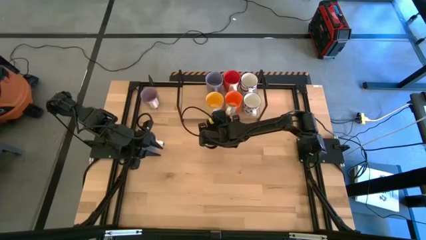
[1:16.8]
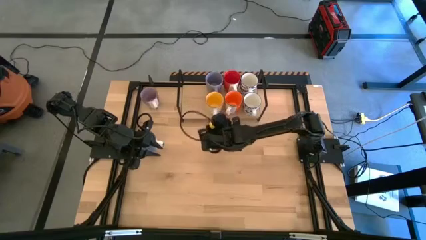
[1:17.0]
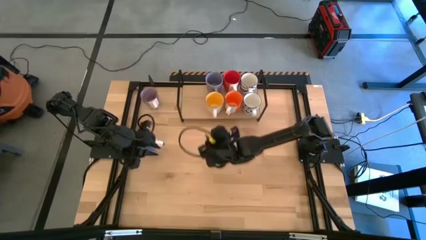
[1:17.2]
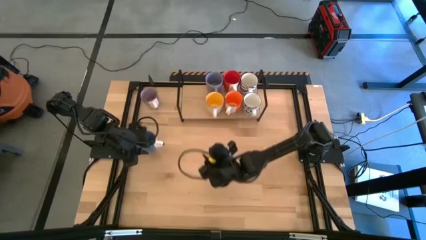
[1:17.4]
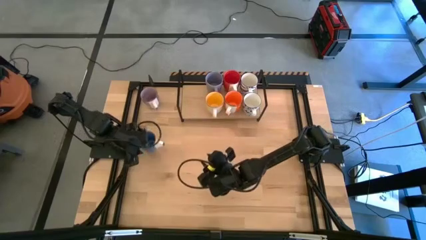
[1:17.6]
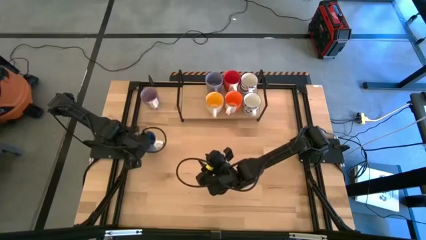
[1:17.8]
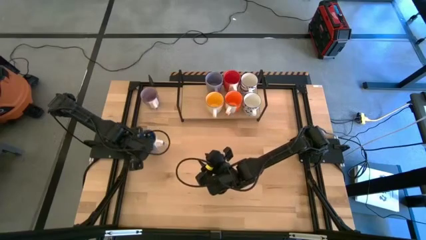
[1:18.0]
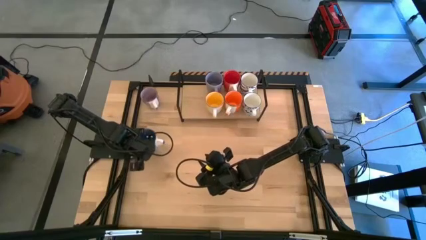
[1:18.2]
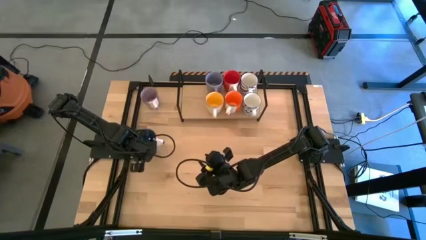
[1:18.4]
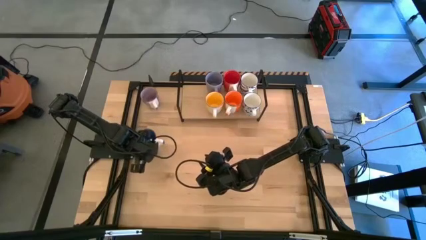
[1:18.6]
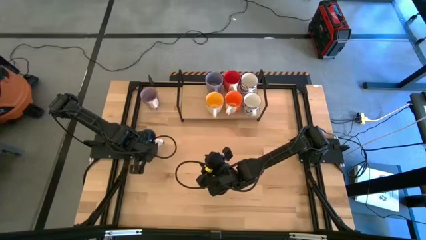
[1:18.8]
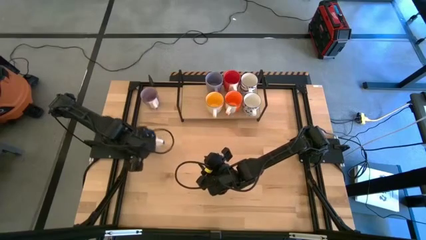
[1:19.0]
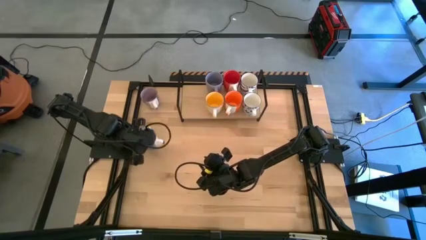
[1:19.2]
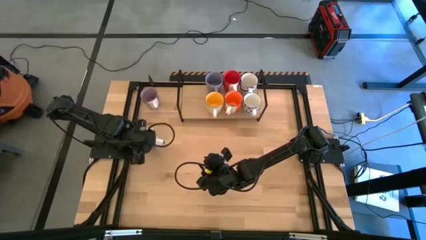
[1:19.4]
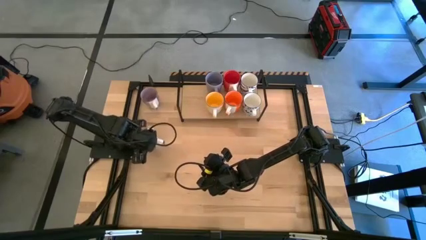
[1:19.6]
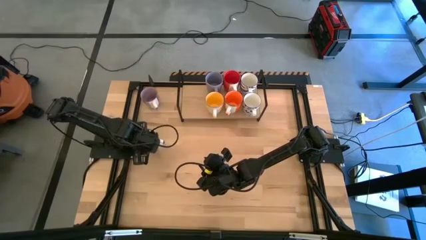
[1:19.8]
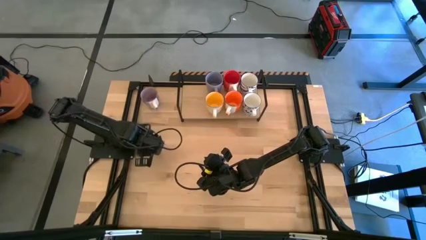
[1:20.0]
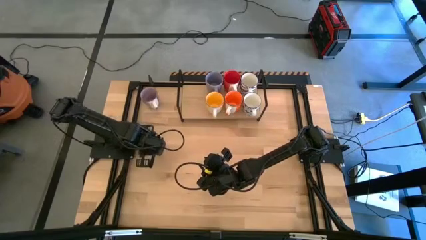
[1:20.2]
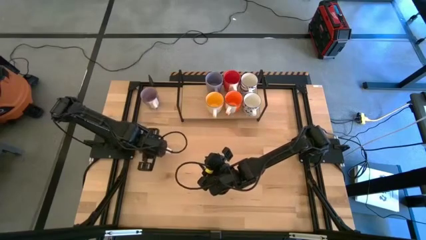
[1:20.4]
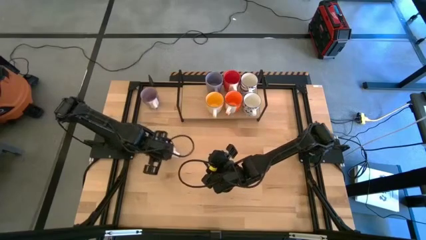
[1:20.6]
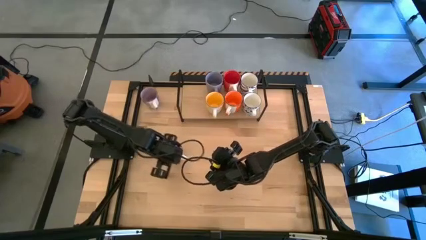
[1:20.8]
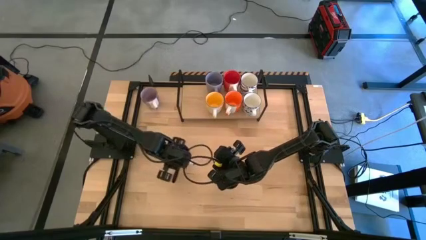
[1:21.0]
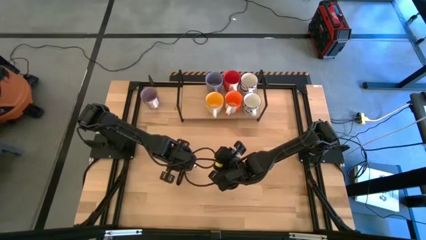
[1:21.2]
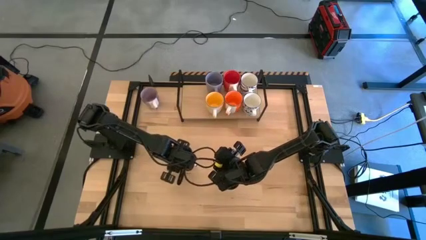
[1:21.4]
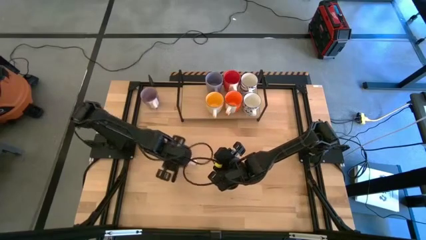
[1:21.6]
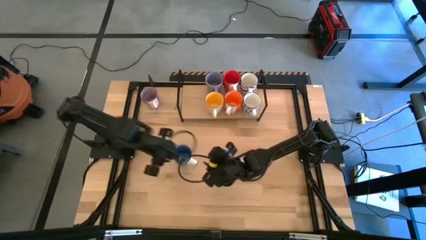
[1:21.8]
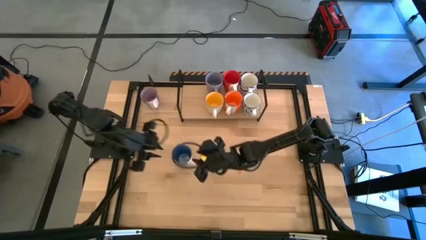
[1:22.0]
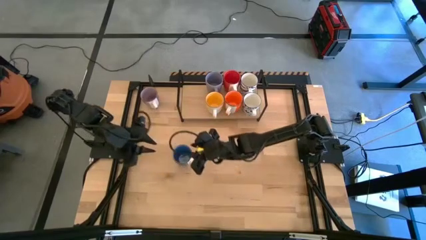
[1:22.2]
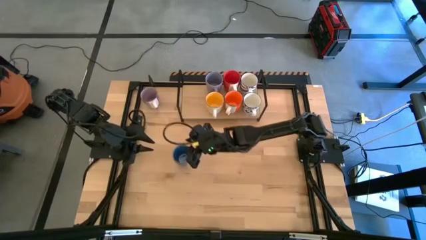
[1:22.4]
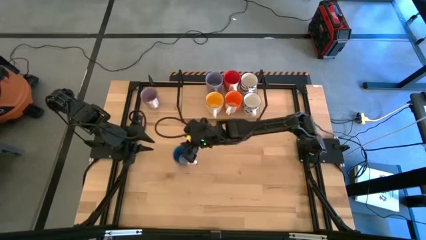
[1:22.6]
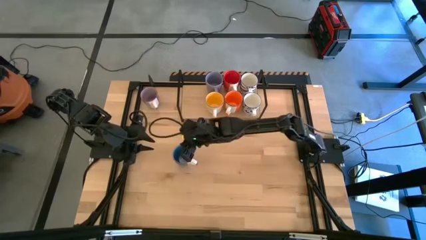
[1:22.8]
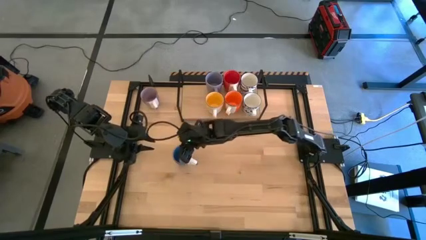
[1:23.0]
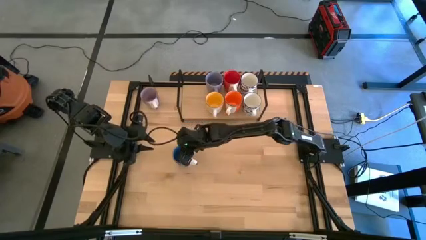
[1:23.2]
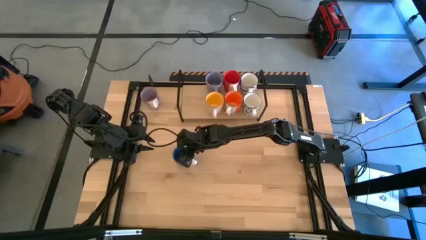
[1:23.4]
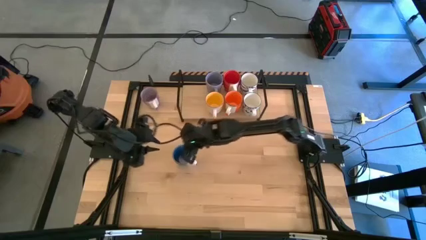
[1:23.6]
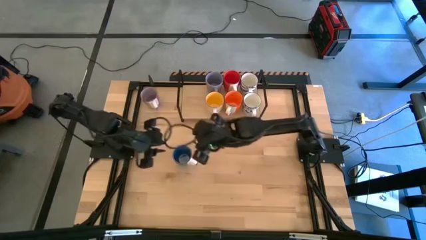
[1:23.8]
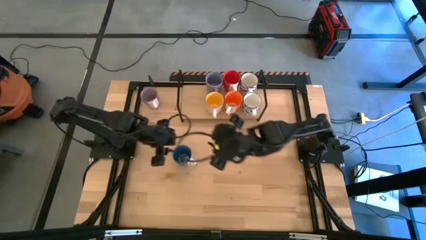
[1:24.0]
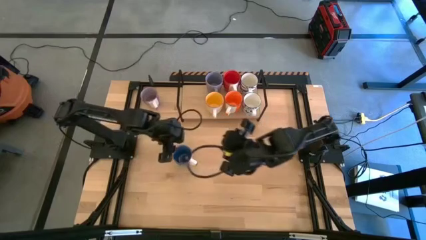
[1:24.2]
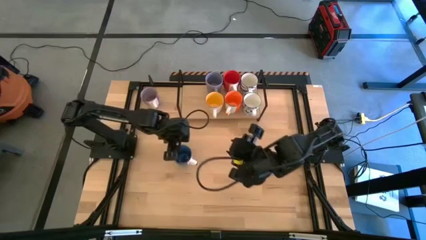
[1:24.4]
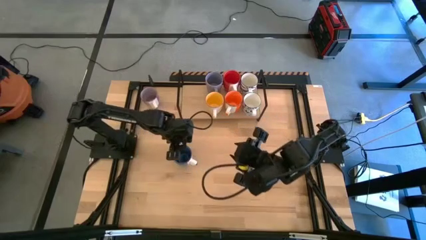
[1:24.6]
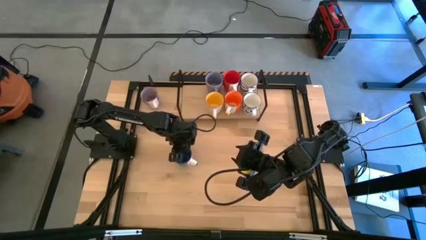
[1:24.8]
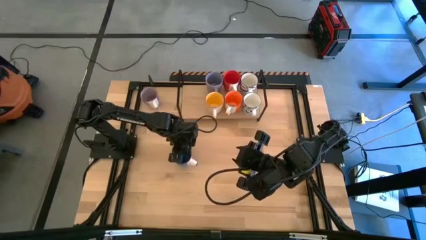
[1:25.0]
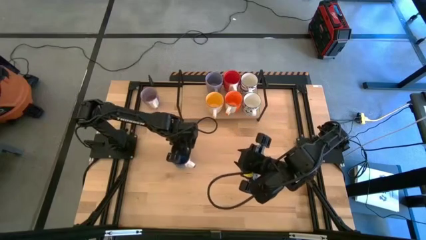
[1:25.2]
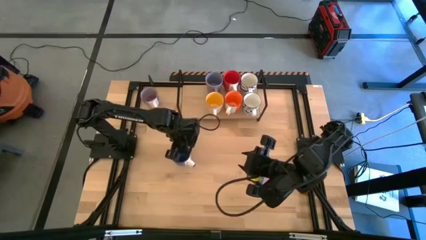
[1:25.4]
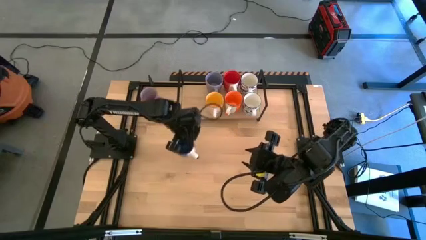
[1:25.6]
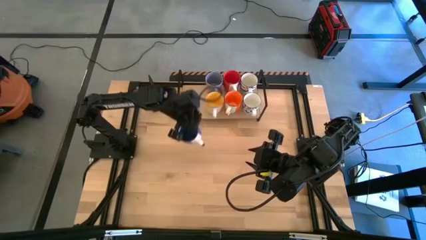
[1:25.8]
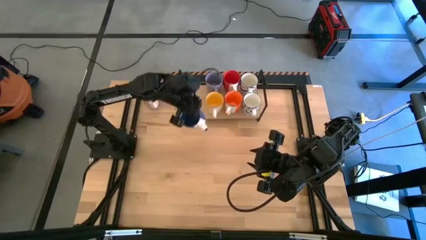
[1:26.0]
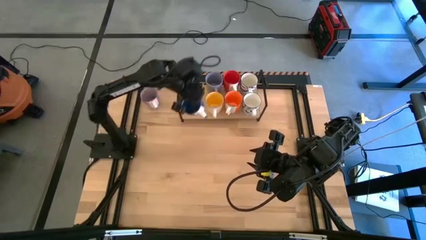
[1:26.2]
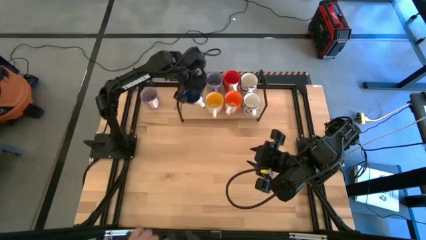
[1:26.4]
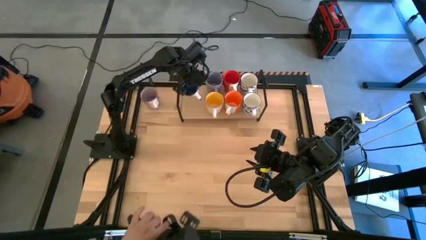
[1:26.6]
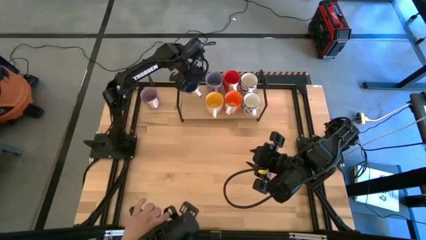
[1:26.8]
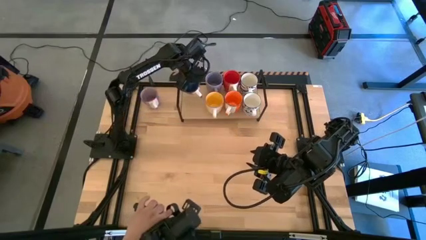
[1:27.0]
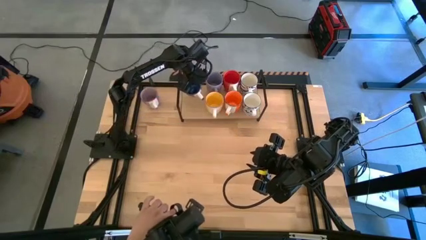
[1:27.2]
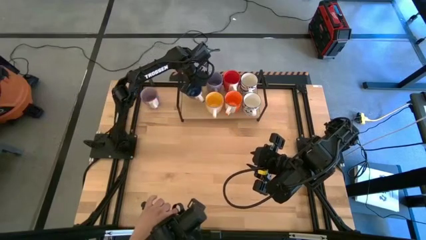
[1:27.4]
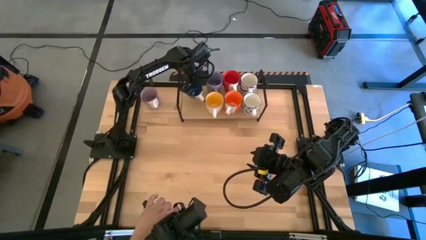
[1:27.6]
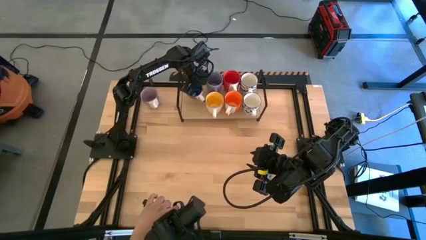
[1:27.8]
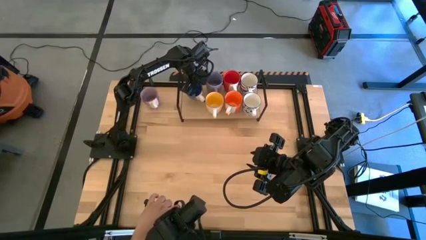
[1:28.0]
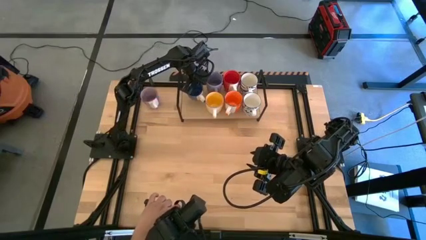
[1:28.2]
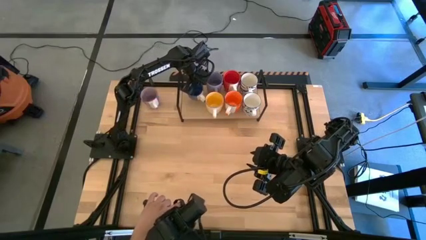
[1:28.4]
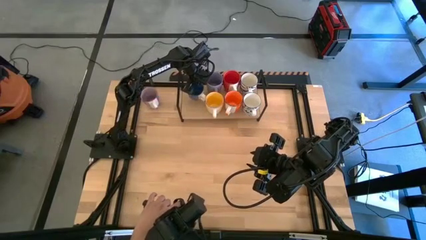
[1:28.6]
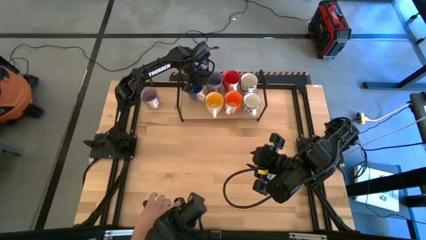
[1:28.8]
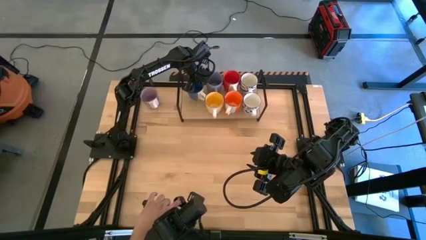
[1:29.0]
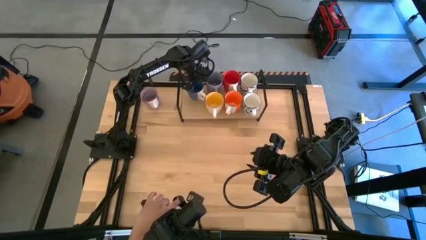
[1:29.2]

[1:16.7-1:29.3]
Task: Place coffee mugs
Put the blue mug on the shelf

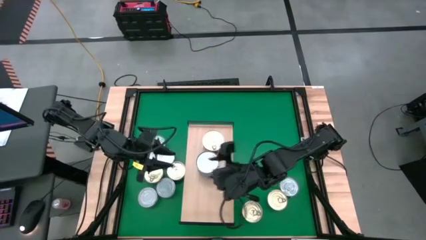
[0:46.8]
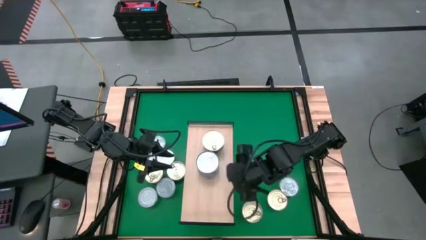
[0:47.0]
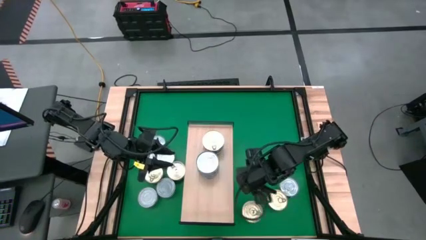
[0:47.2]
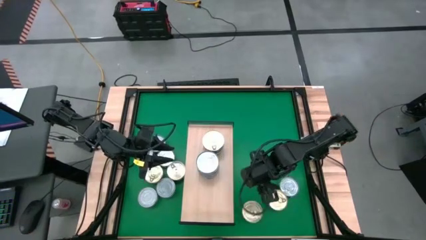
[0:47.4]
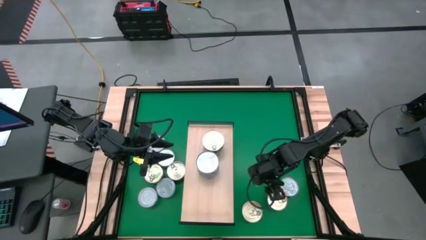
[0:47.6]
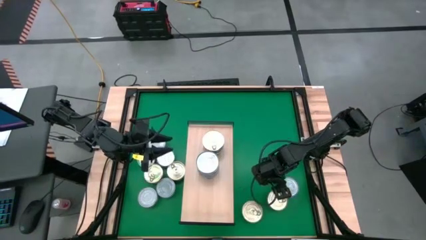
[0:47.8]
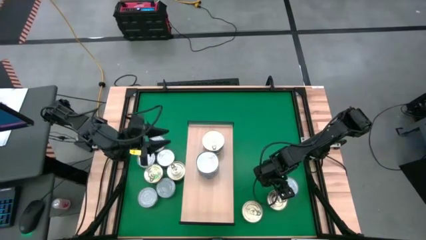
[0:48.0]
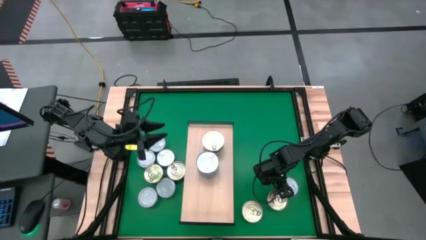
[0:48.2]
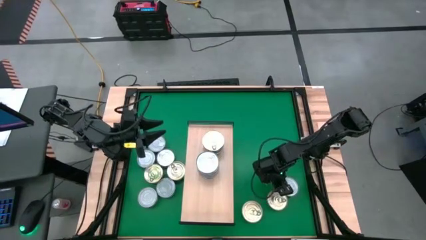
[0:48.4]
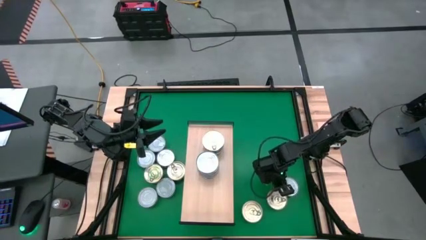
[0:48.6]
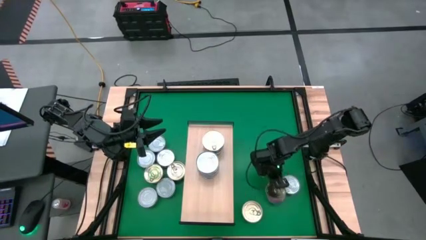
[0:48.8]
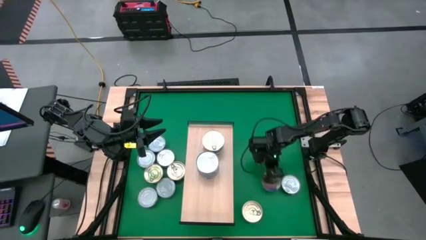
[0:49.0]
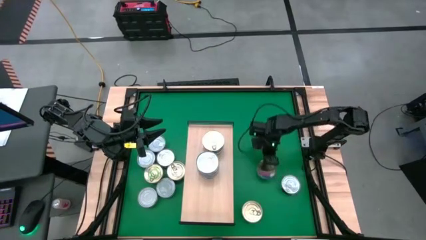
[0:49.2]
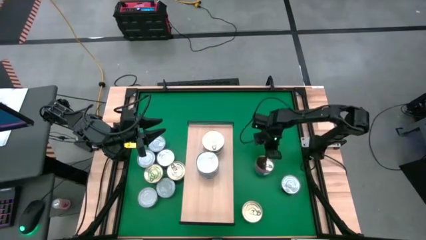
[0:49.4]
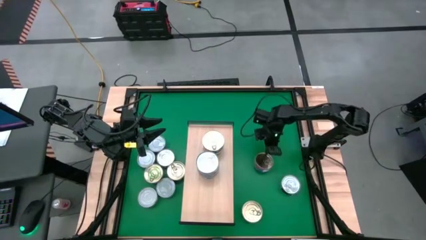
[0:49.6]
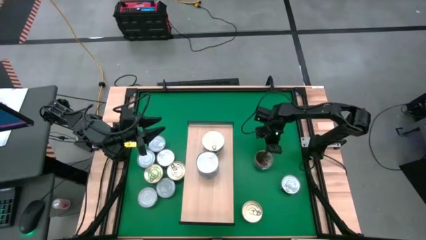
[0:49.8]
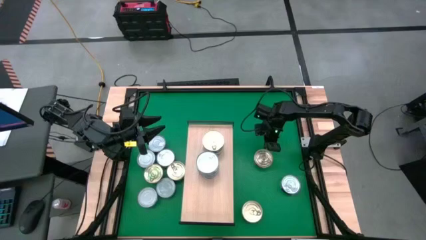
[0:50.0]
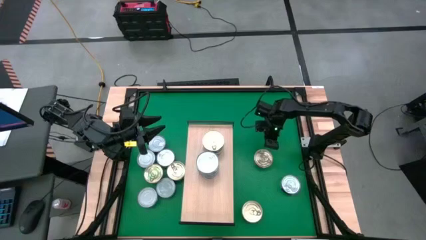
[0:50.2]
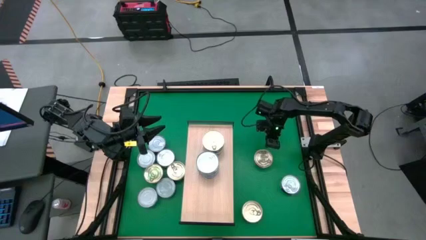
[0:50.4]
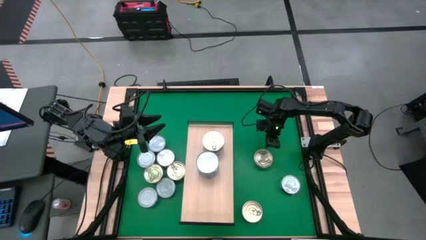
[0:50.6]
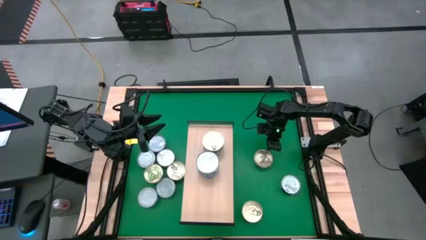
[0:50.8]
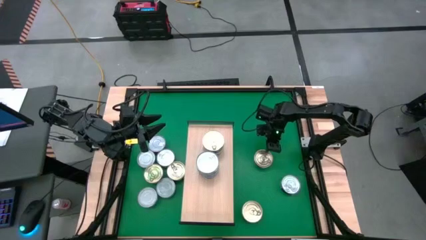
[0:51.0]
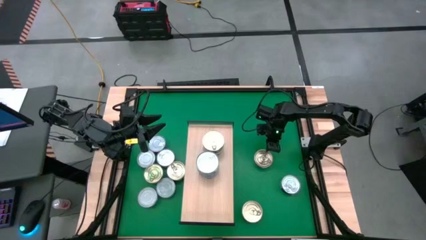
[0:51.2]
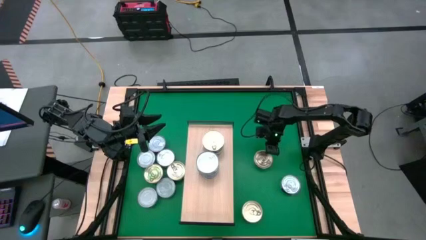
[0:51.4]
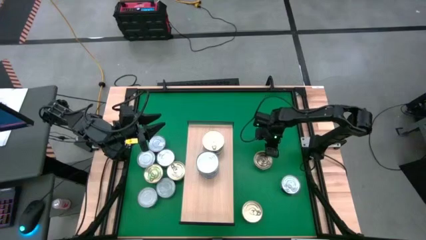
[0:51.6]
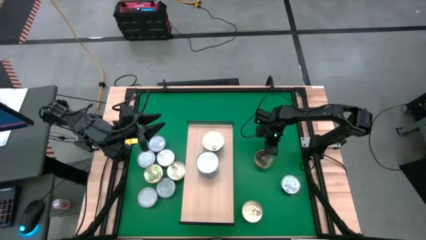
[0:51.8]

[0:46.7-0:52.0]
Task: Stack canned seafood by type on shelf
Stack the blue pink tuna can on top of the other blue pink tuna cans on the shelf
